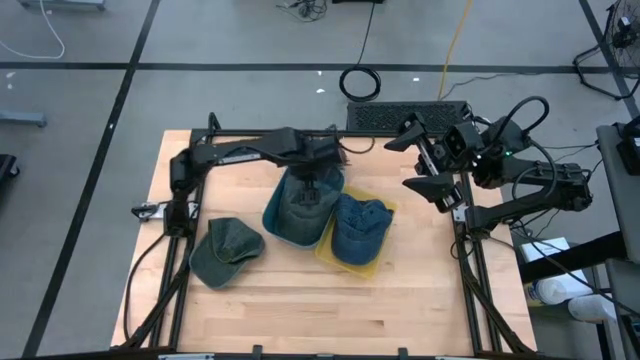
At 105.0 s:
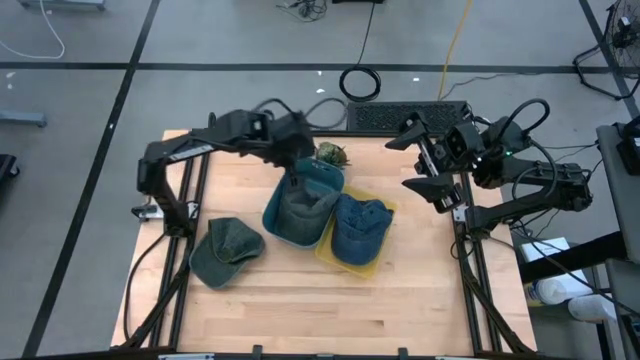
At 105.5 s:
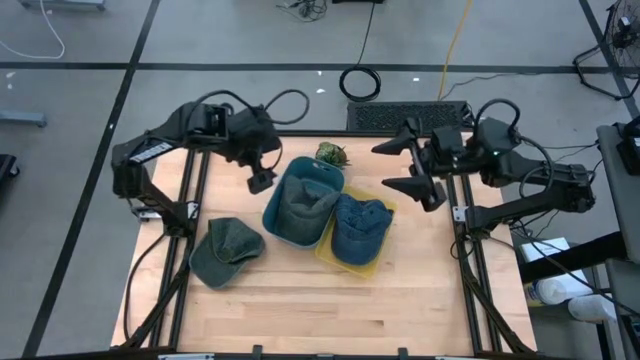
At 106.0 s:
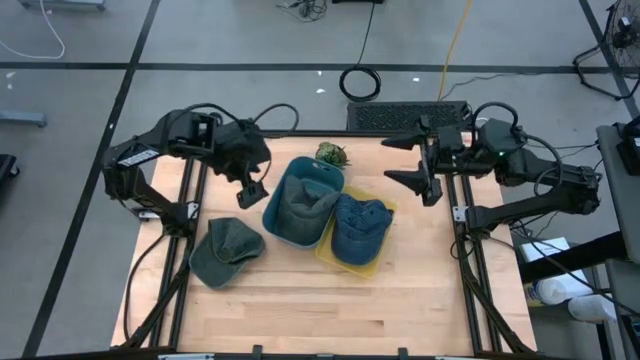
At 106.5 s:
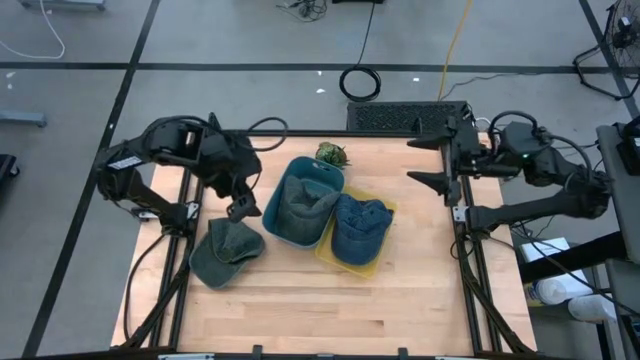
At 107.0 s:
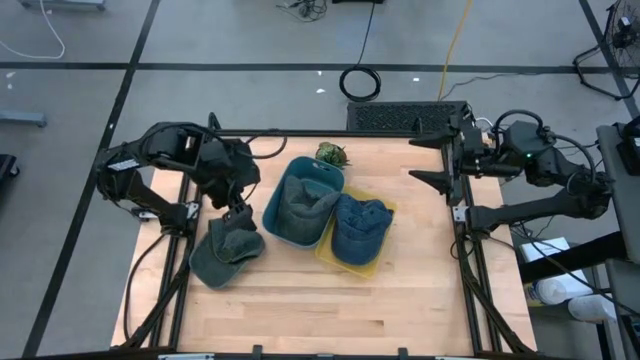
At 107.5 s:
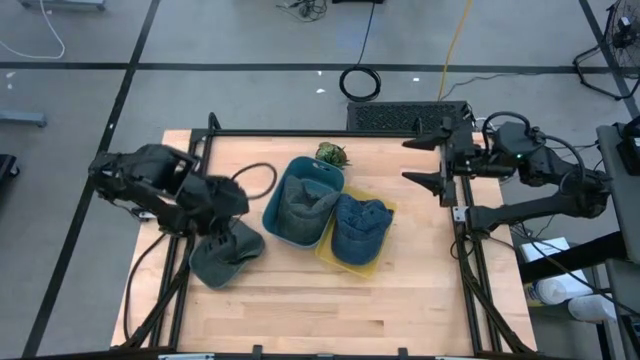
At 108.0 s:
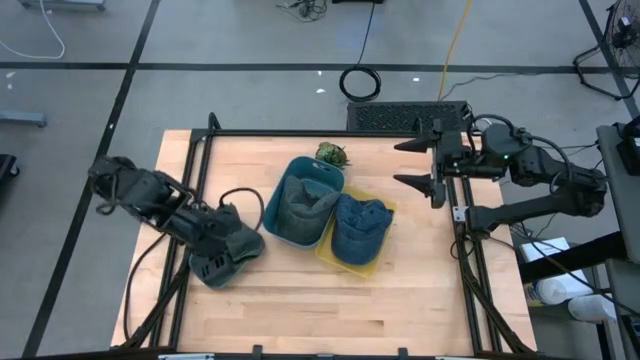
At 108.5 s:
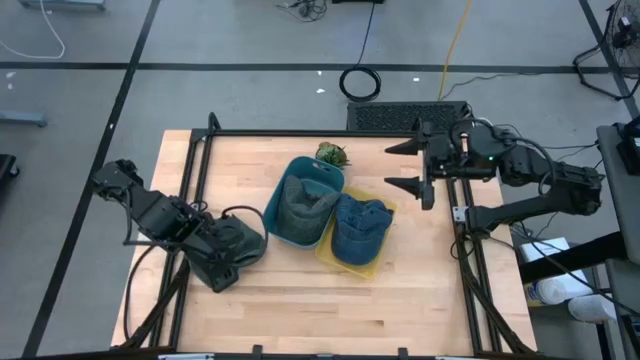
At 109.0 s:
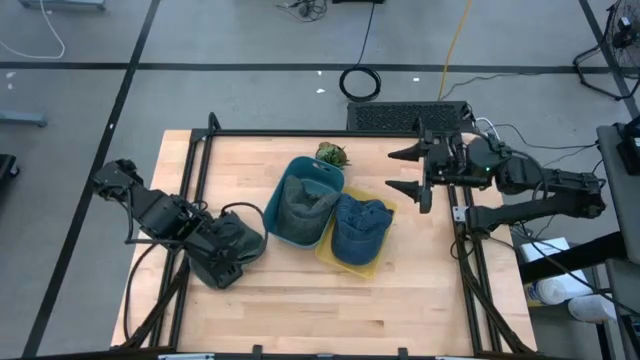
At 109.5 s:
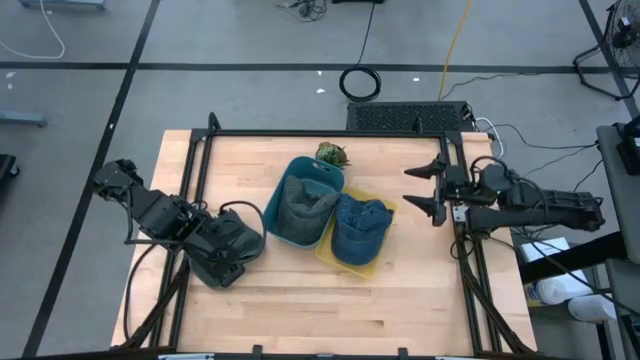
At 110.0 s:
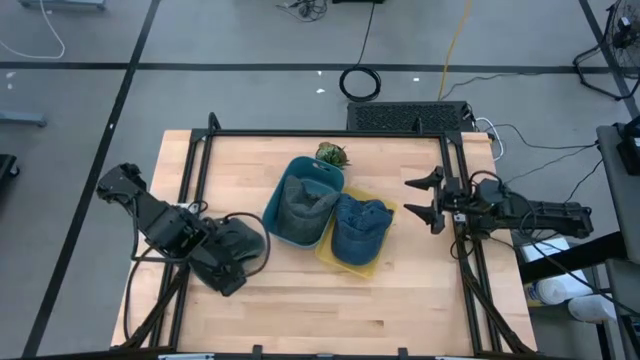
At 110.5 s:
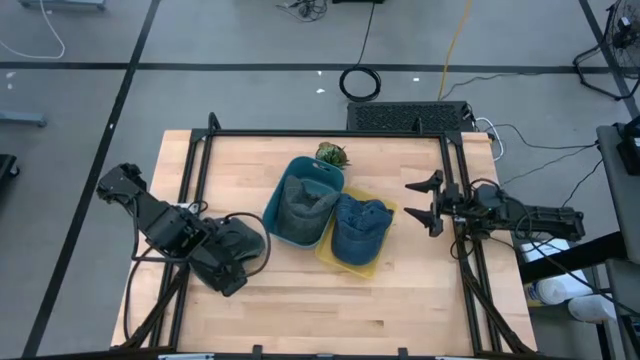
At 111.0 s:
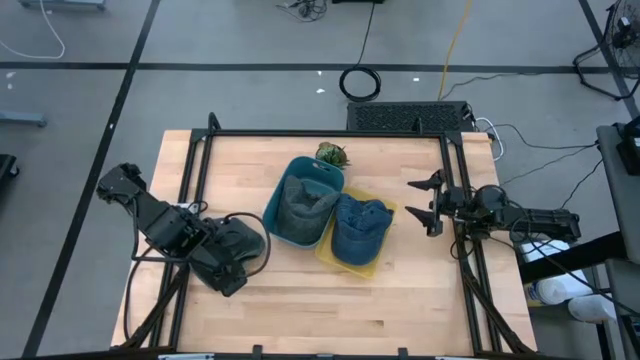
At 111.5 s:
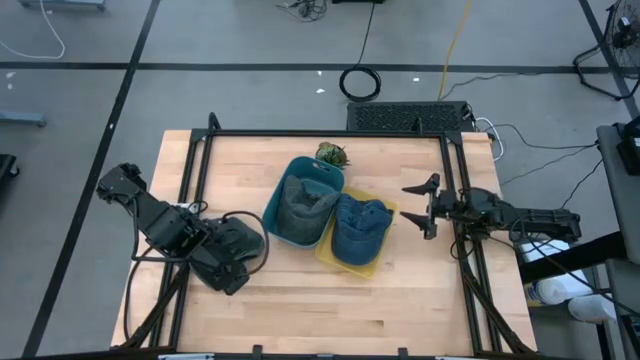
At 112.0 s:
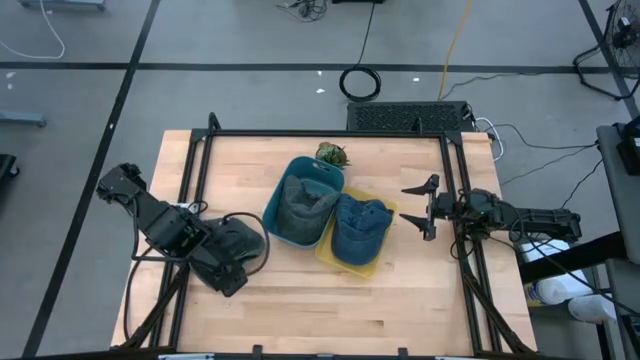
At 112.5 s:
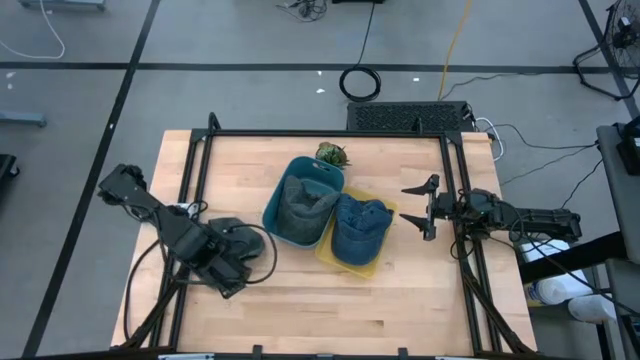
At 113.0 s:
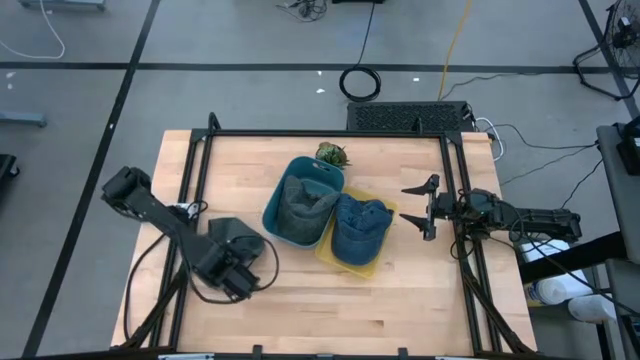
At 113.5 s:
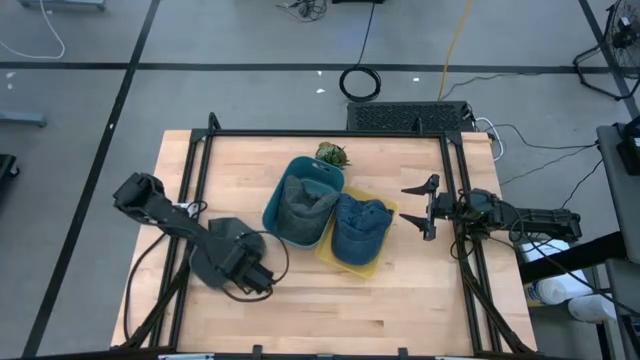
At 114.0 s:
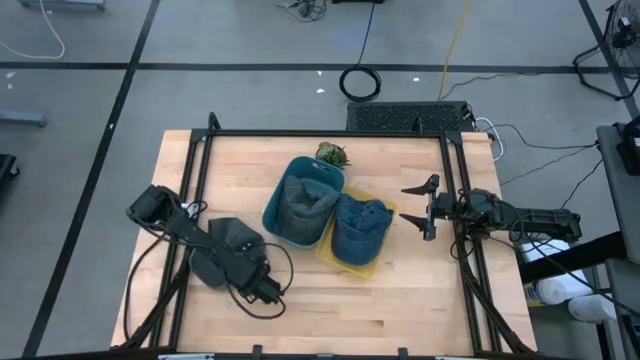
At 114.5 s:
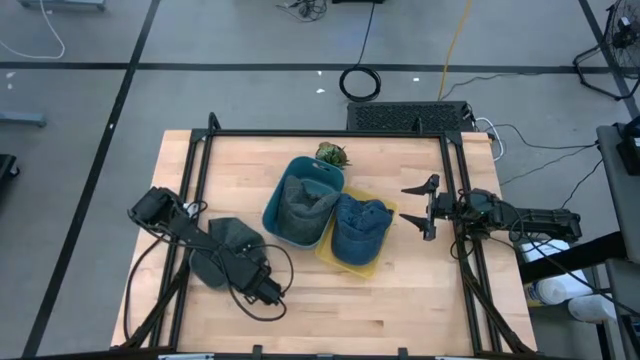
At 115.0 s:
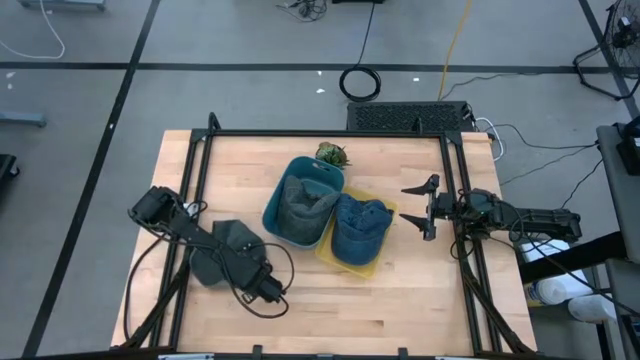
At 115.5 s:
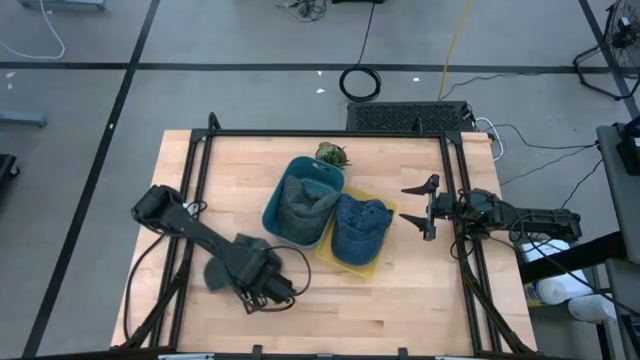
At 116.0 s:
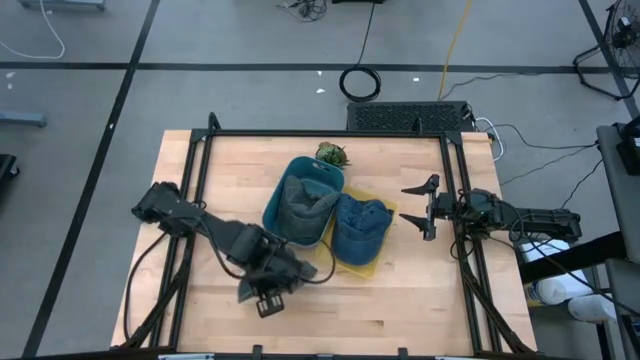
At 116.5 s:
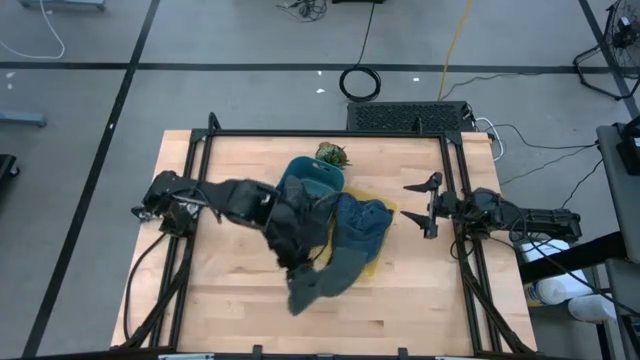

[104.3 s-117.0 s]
Task: Pick & Place hat
Put the black cap into the blue bin

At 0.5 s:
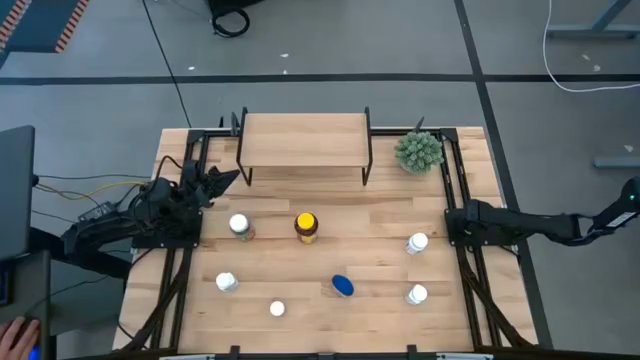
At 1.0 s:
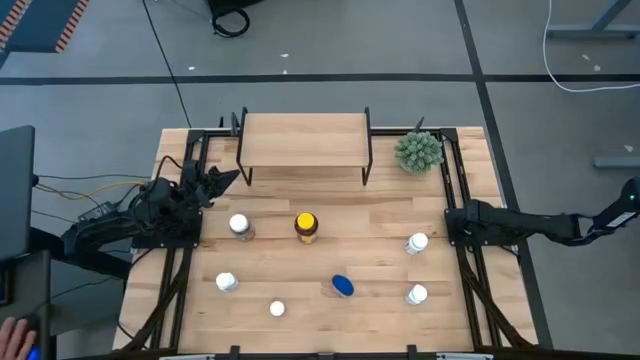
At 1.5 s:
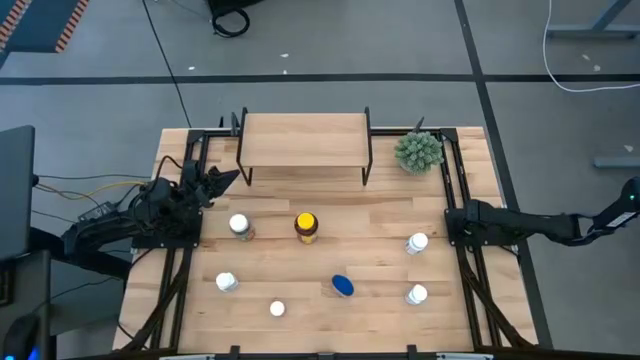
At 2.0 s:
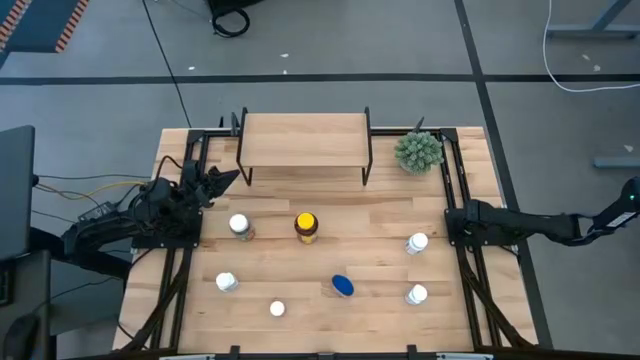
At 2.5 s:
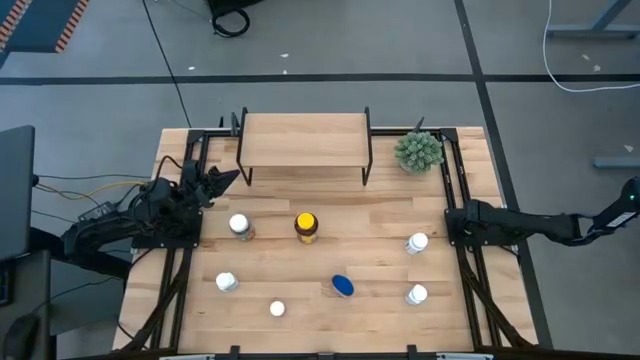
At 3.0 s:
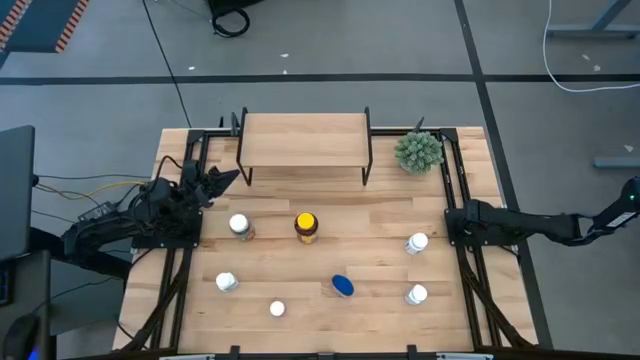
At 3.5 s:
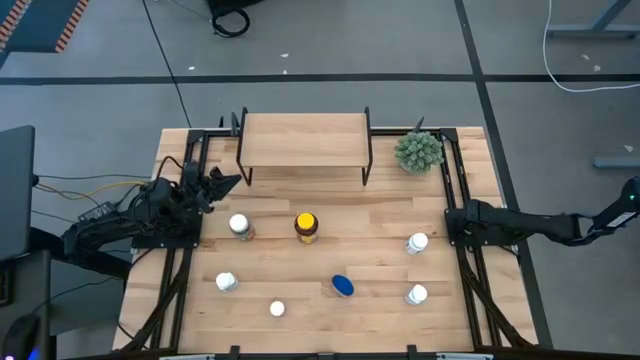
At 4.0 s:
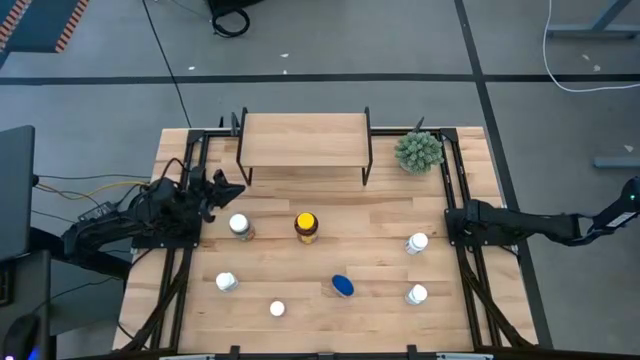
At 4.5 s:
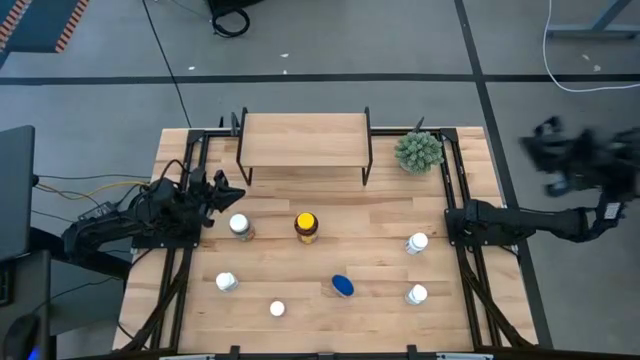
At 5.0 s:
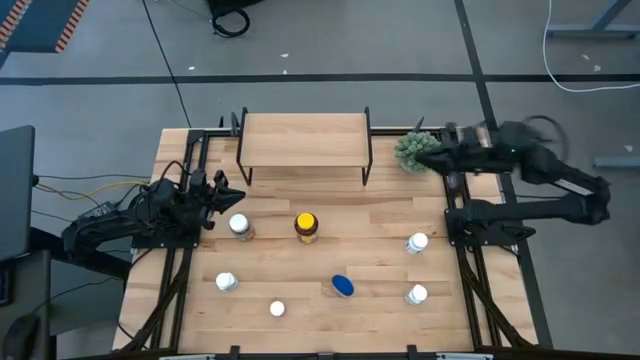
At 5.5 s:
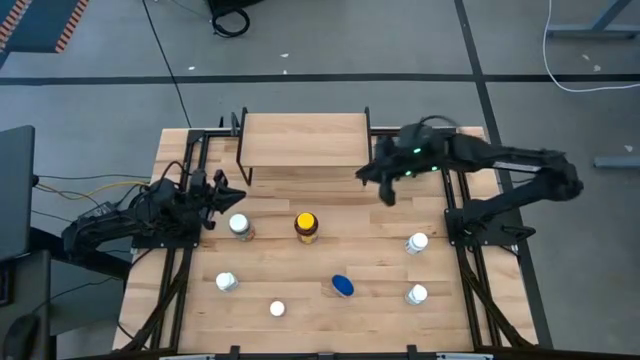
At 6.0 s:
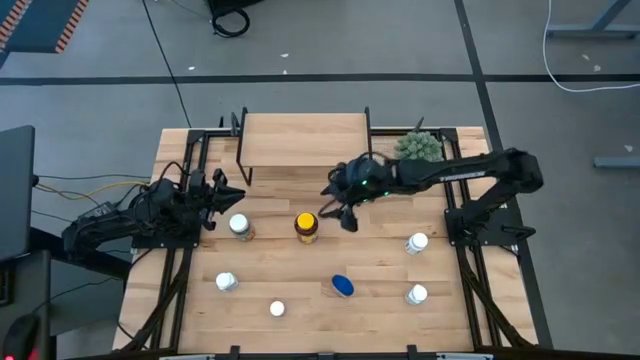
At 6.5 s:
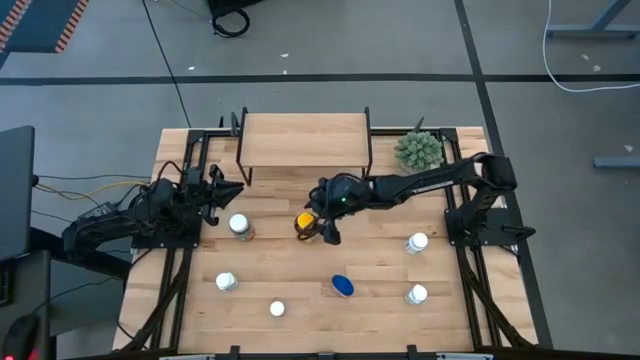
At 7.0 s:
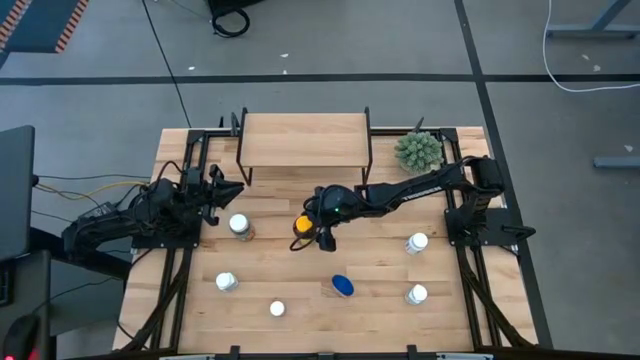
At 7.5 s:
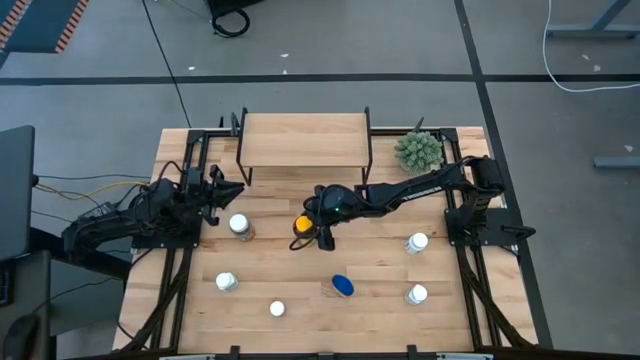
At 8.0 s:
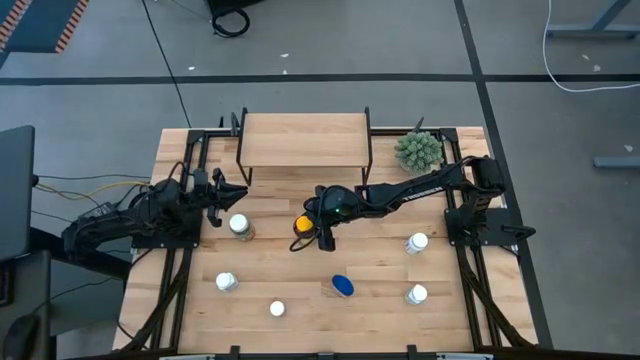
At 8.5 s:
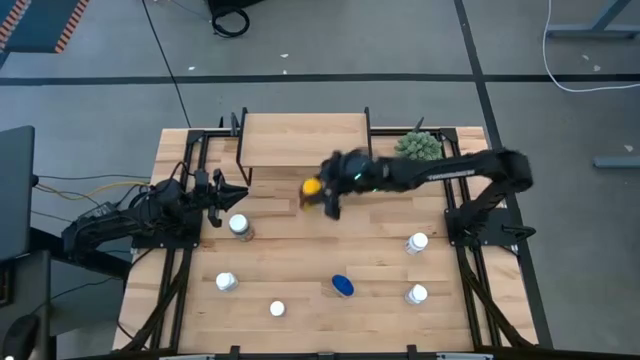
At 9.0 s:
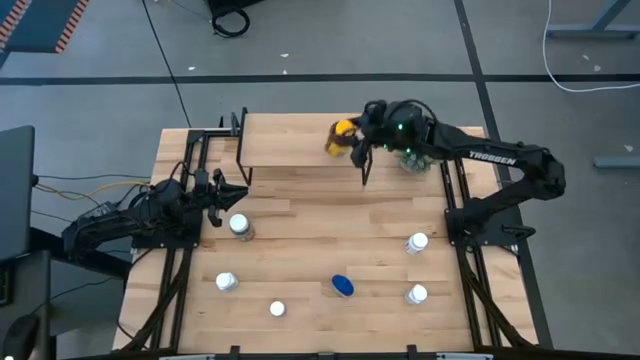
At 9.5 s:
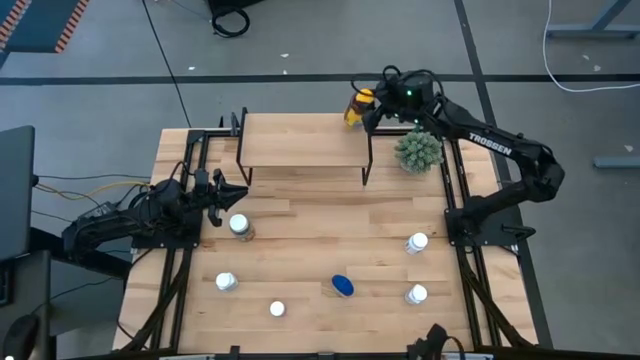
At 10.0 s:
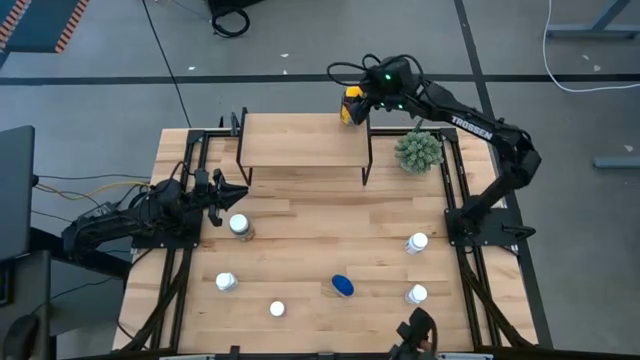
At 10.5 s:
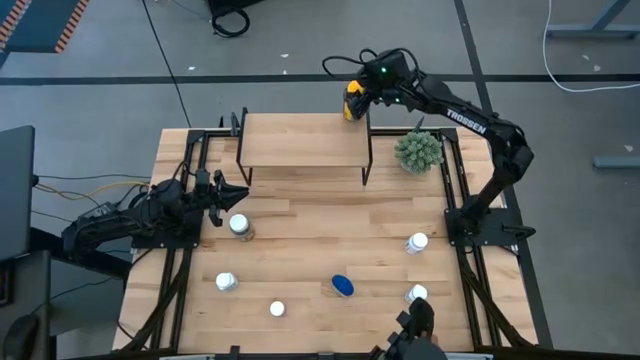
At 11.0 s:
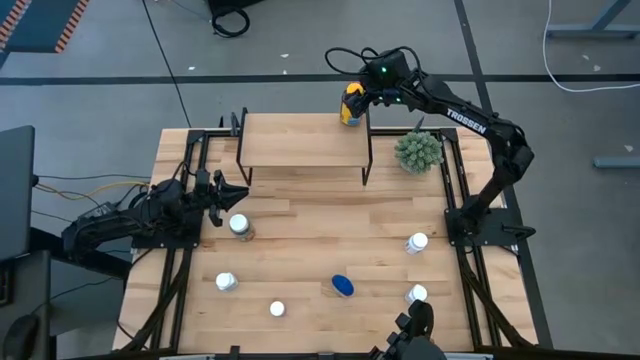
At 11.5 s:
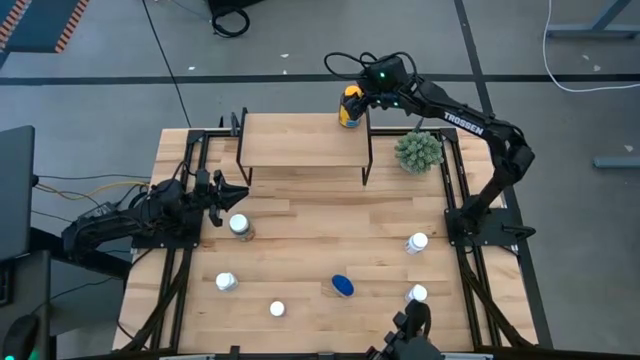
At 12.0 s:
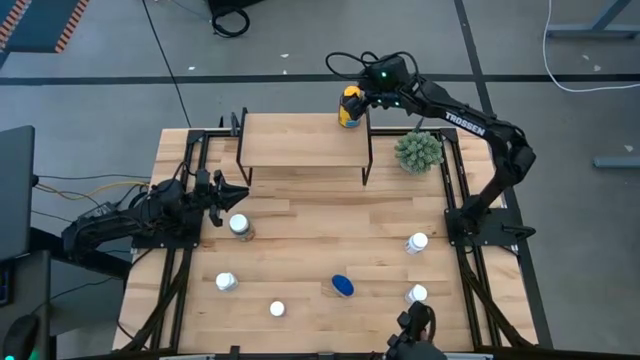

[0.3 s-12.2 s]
Task: Pick and place medicine bottles onto shelf by color
Put the yellow pill bottle on the shelf
